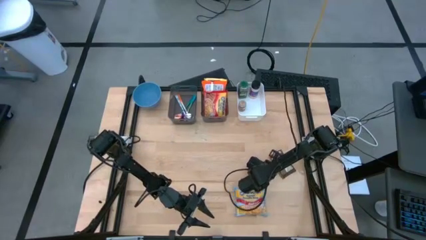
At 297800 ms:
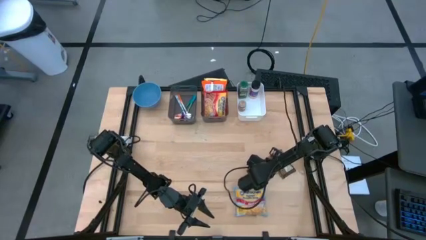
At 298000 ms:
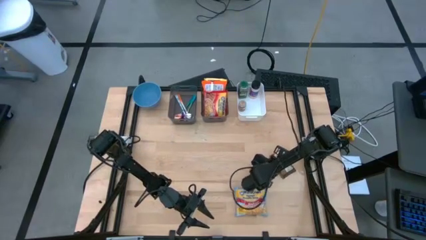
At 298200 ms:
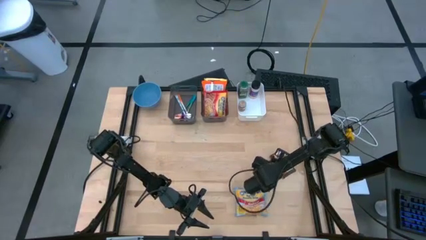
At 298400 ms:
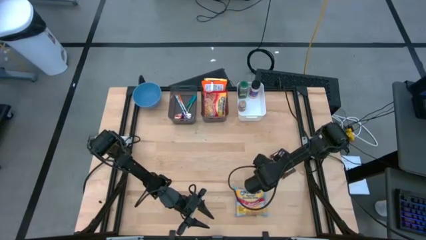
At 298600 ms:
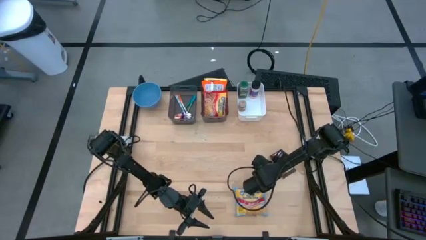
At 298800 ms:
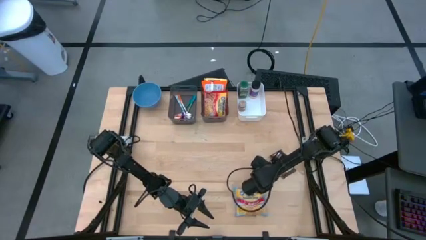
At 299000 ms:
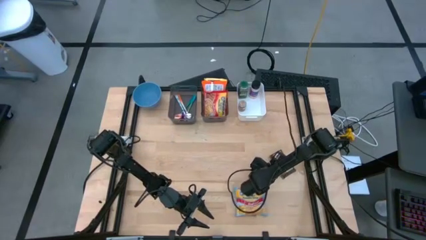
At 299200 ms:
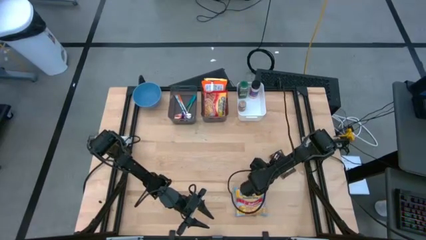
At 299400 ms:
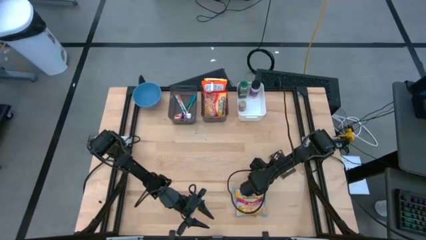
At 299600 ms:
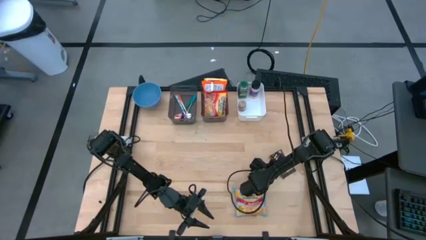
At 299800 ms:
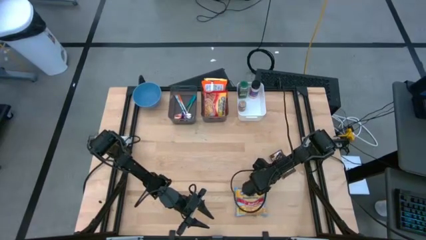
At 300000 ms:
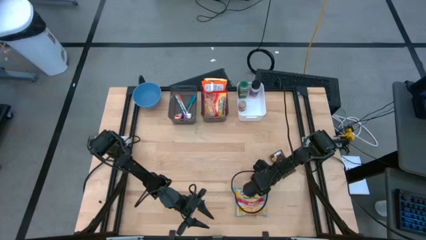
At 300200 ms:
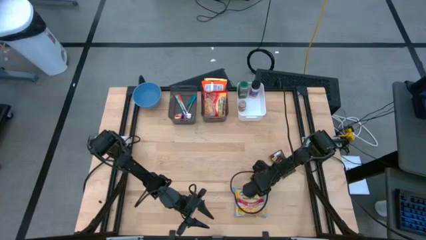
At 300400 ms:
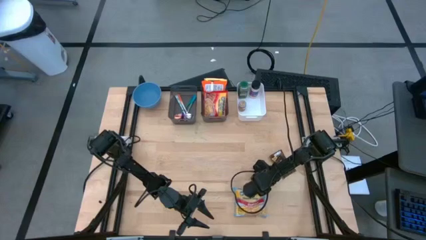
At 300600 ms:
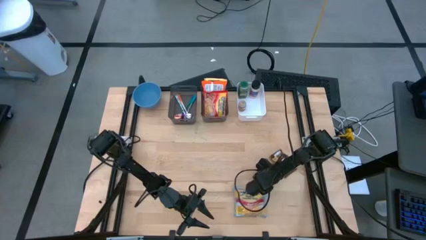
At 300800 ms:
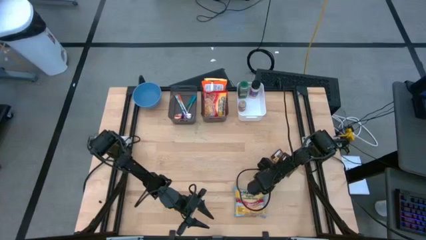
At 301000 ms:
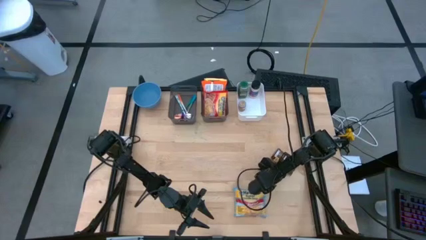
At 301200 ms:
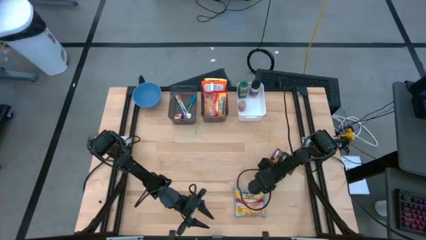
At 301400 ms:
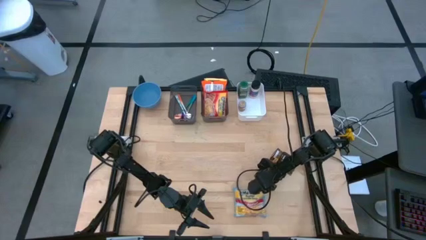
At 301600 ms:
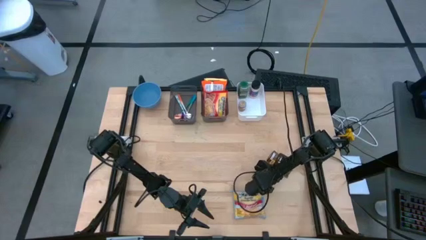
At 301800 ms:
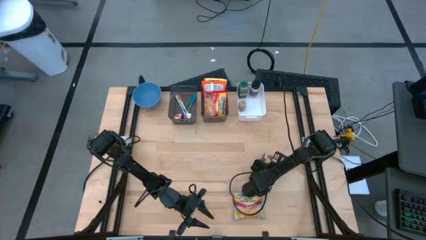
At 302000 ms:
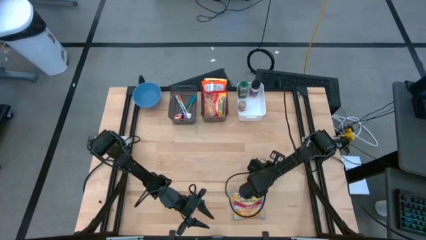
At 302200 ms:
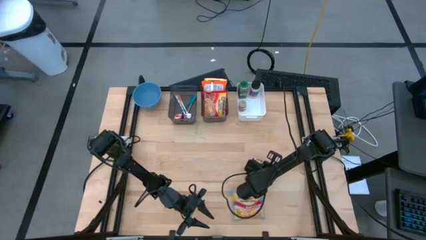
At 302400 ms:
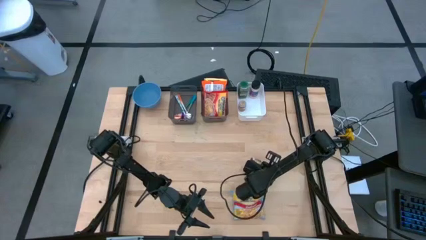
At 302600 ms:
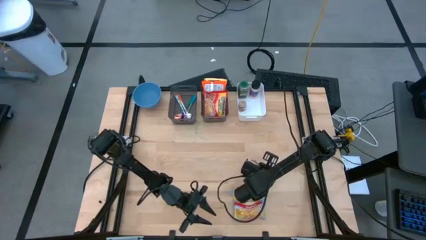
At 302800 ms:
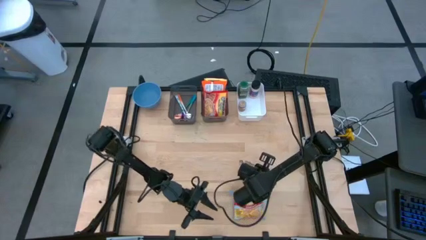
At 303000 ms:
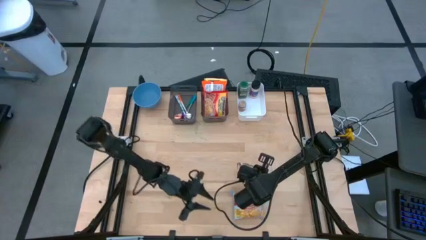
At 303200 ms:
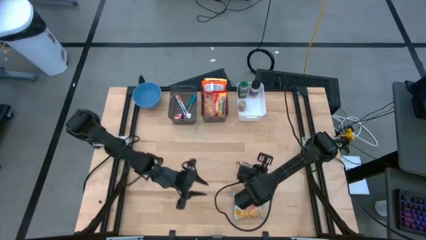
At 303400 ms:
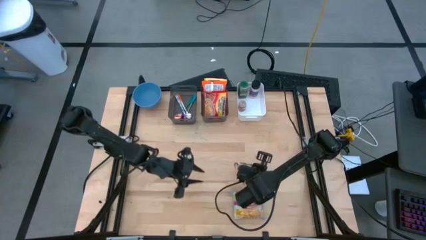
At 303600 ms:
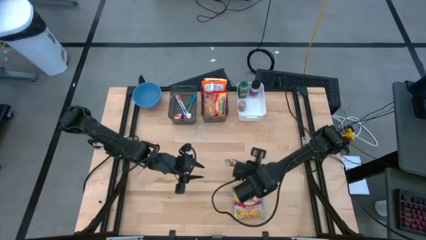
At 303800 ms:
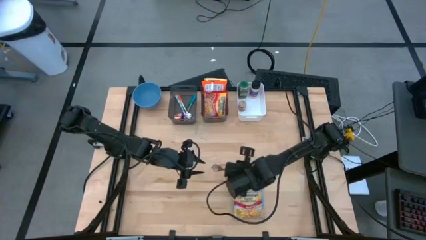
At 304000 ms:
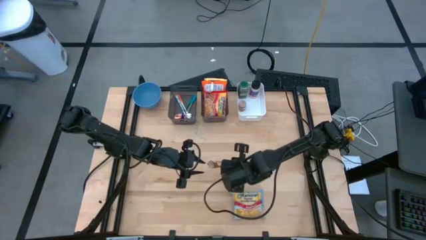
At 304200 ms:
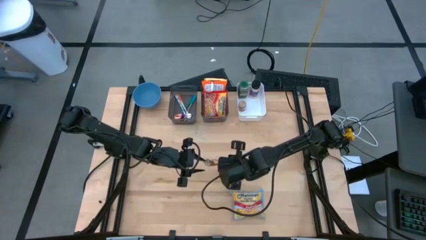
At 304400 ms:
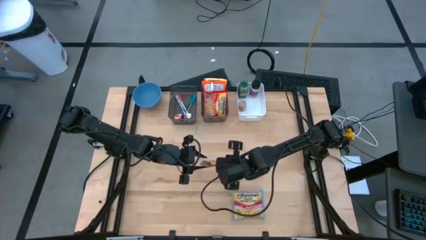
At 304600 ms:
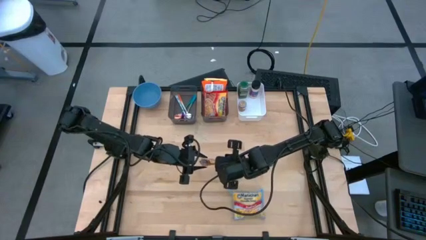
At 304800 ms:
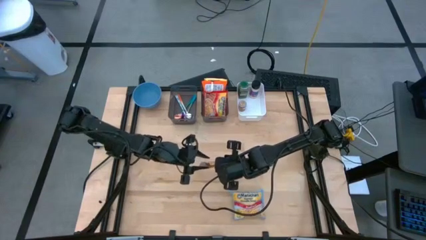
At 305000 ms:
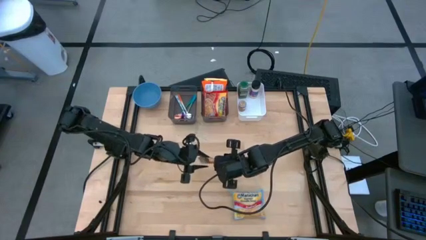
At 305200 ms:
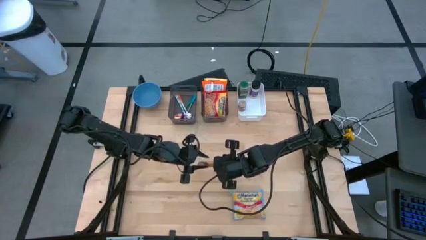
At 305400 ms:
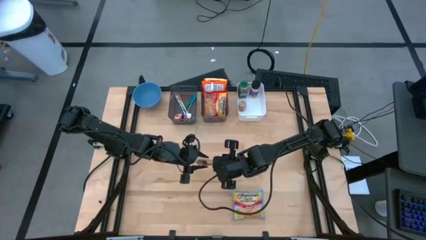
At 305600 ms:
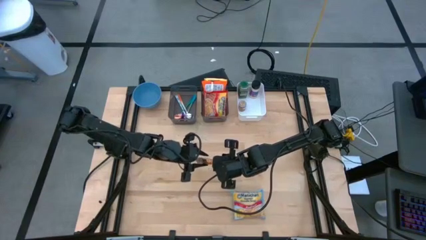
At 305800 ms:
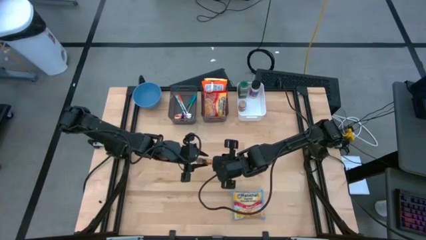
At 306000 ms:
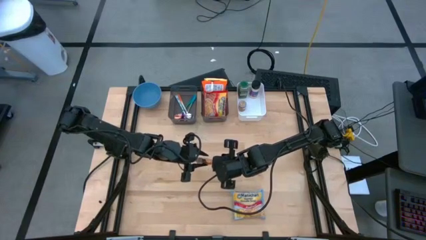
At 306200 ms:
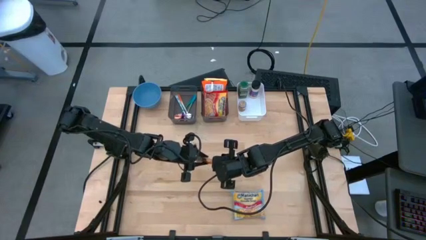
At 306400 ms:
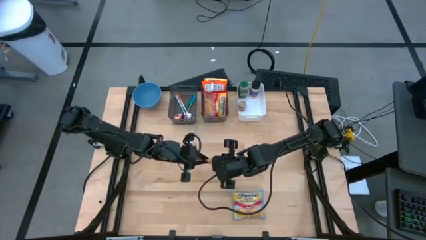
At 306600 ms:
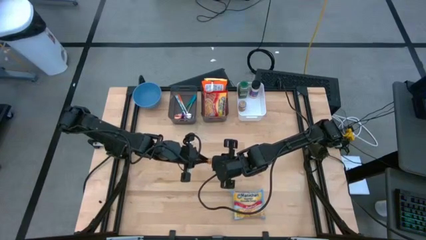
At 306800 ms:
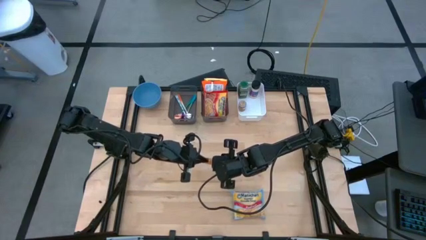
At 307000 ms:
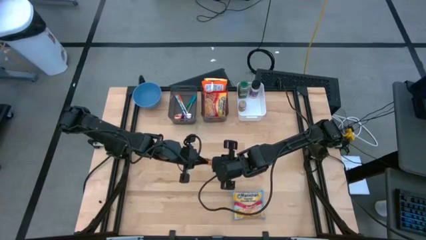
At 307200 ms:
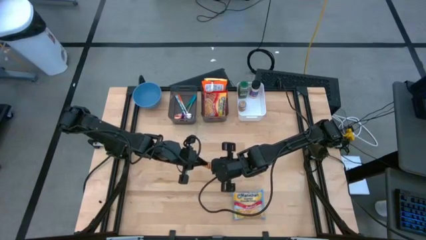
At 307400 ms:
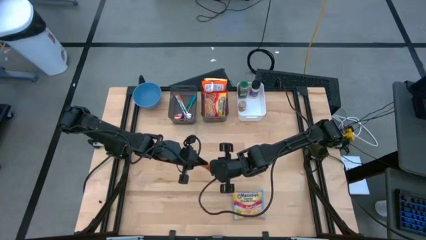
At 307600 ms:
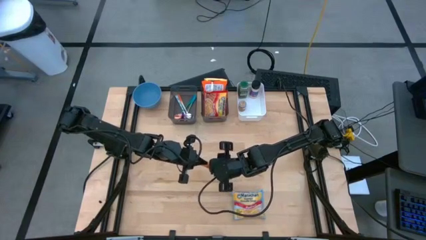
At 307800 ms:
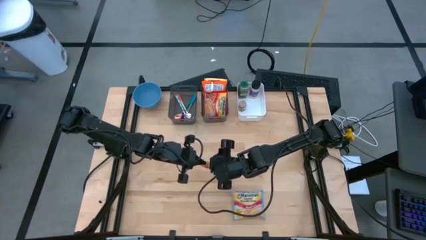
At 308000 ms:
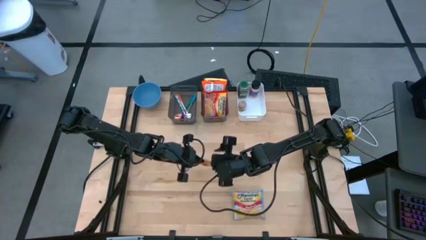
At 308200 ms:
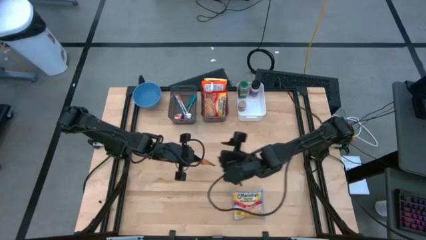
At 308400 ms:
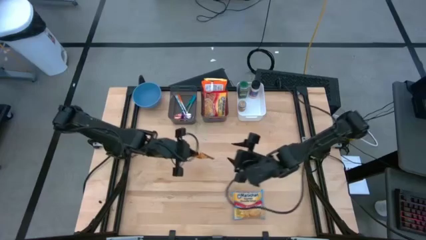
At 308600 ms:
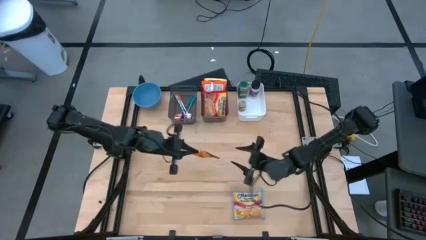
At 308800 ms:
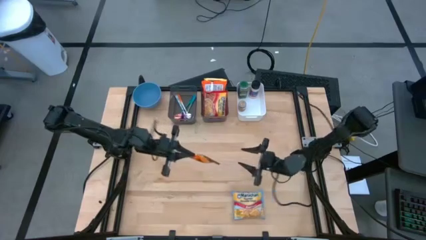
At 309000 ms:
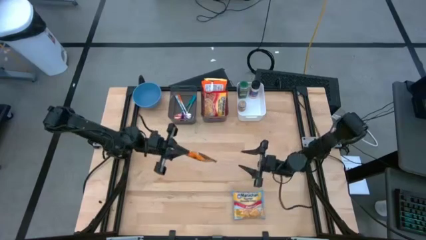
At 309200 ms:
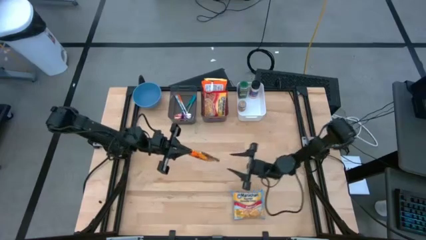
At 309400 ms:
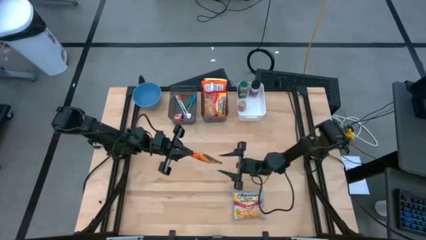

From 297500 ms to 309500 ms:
Task: Pick & Place Food Item
Put the orange seasoning pack into the white bin

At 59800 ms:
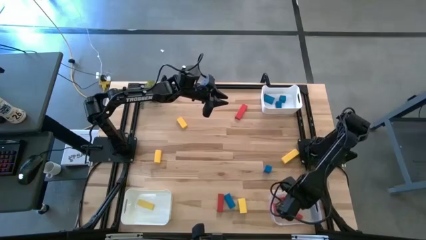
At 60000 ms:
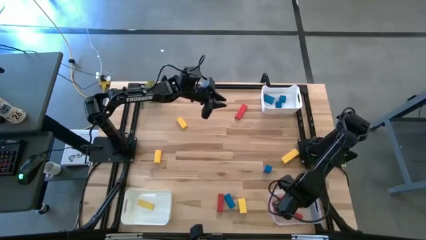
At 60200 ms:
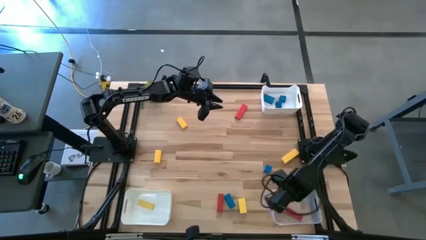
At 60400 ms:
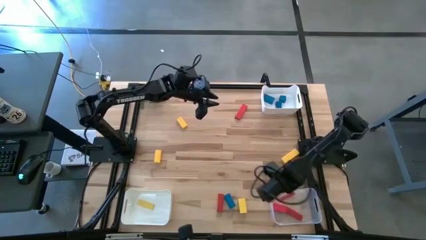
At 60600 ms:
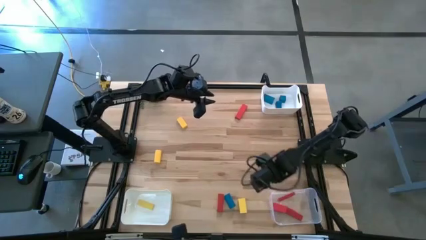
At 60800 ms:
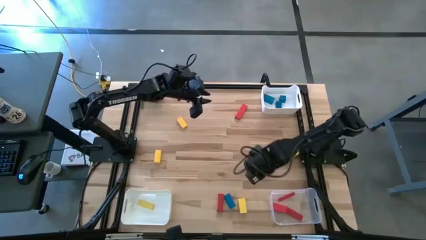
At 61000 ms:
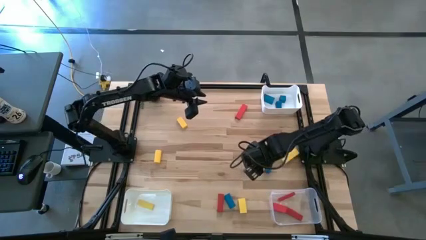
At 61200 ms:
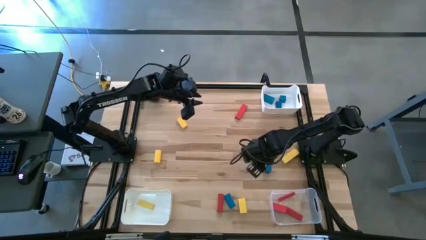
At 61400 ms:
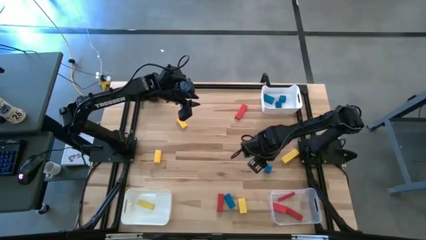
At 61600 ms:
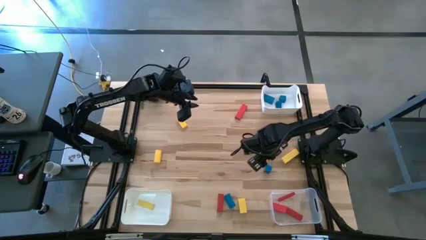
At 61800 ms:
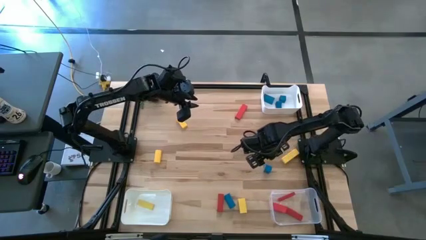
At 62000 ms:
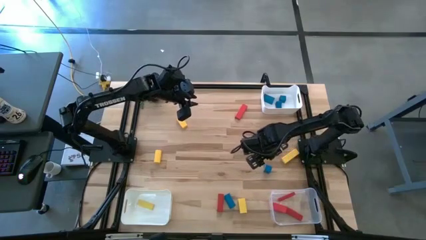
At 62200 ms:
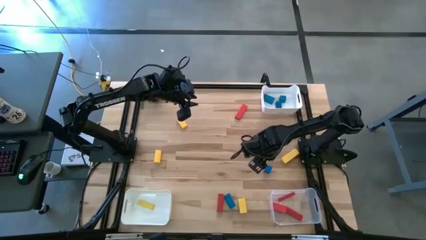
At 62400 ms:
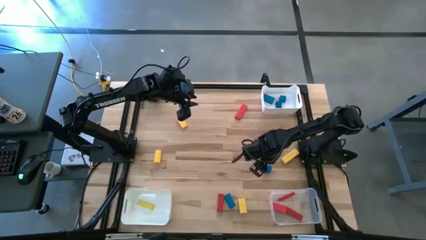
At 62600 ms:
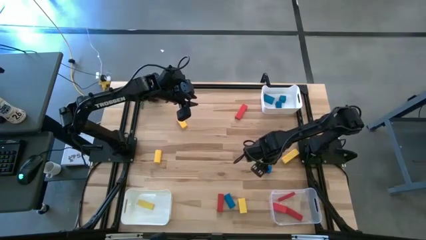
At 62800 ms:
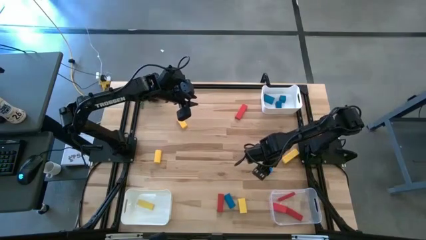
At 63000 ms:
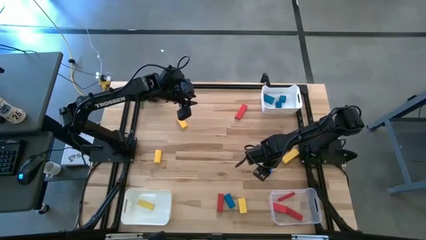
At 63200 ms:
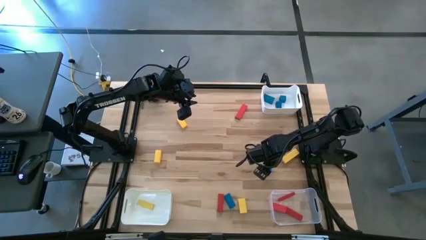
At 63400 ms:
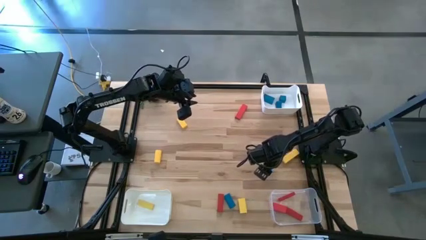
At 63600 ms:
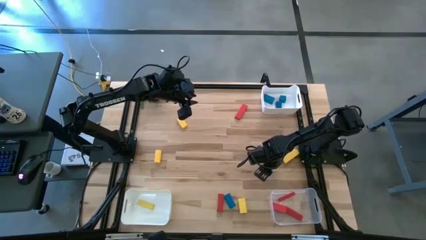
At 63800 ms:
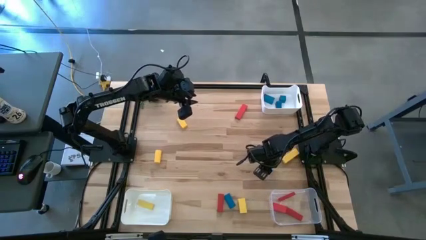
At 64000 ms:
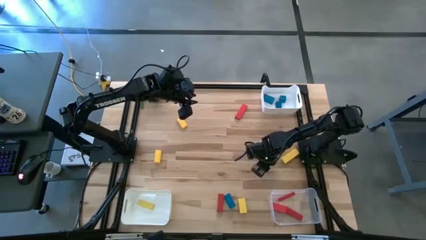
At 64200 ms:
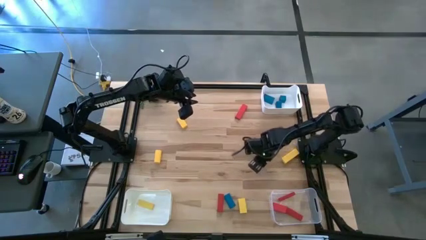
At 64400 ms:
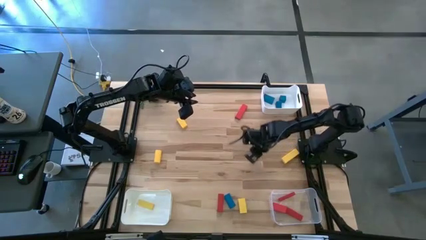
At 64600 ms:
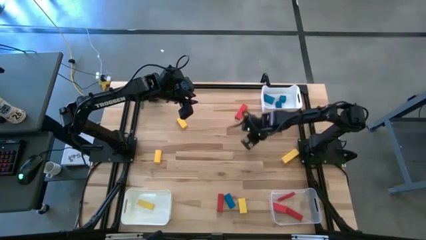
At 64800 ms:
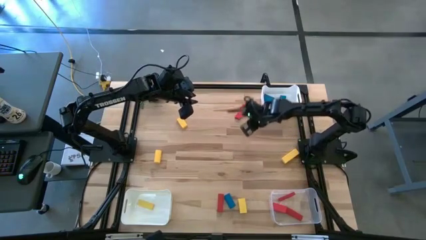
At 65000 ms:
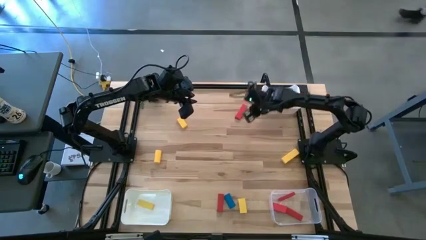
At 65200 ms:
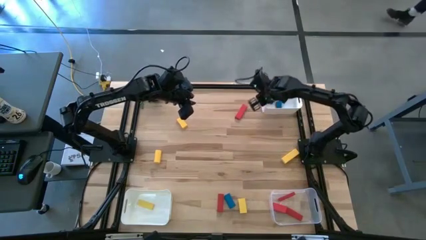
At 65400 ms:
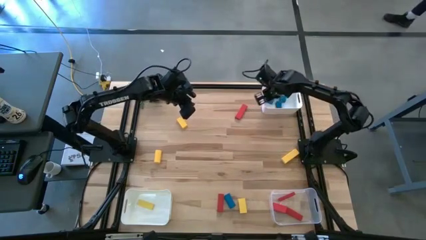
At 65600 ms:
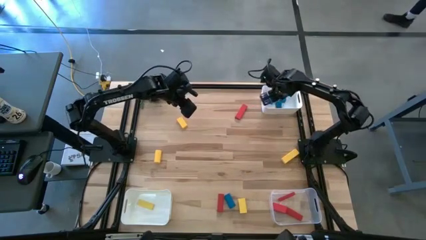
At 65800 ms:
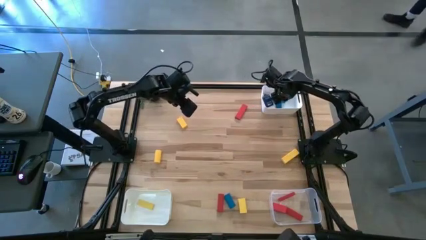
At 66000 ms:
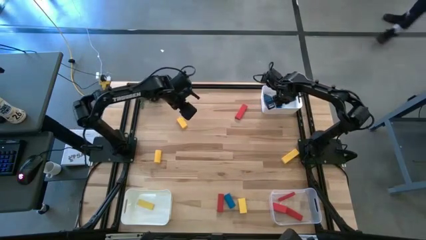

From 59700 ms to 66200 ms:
Task: Sort & place blocks by color
Put the blue block into the top white bin
